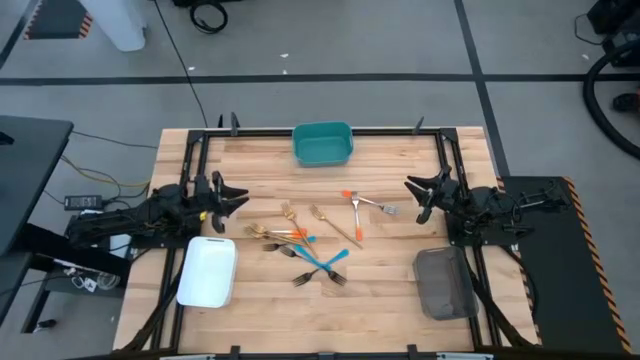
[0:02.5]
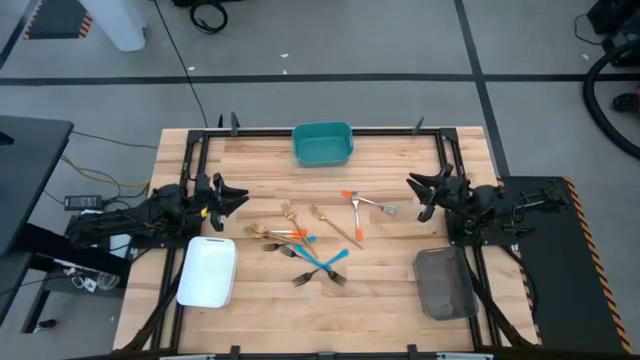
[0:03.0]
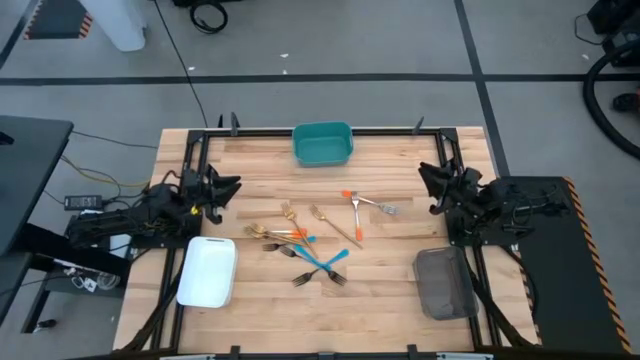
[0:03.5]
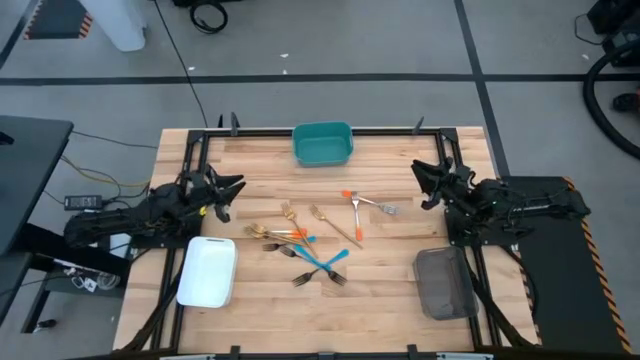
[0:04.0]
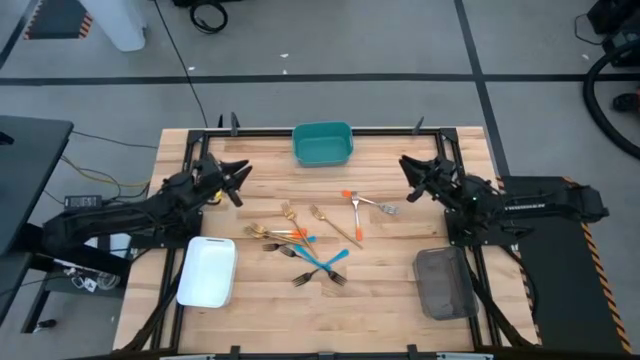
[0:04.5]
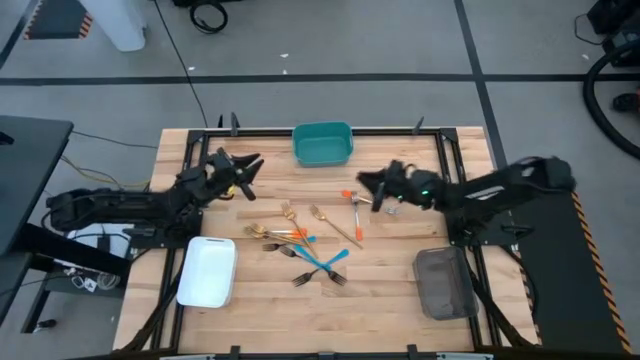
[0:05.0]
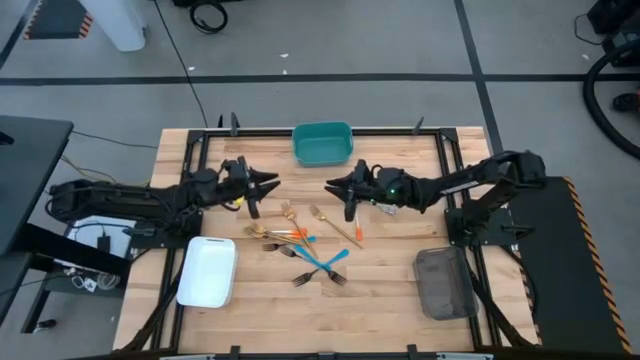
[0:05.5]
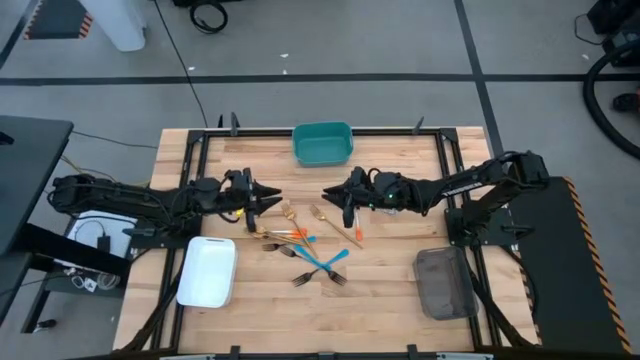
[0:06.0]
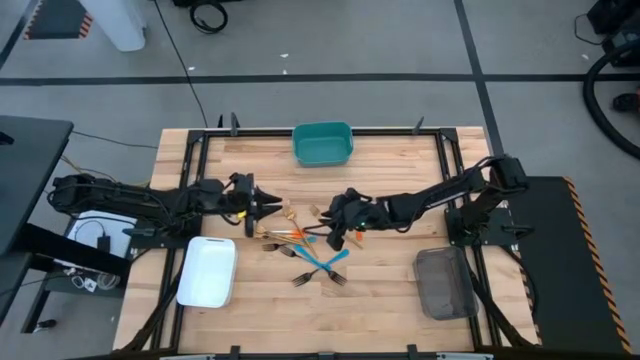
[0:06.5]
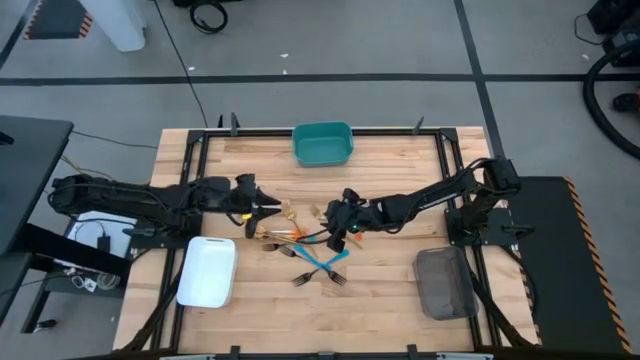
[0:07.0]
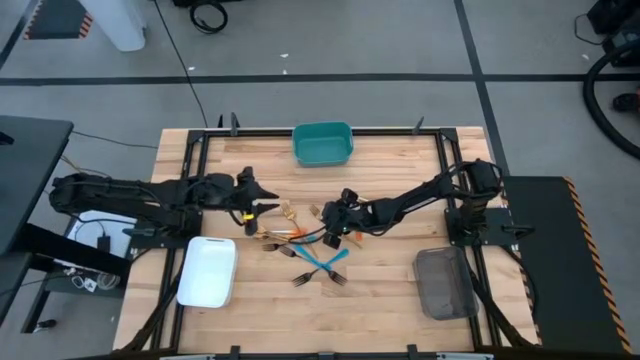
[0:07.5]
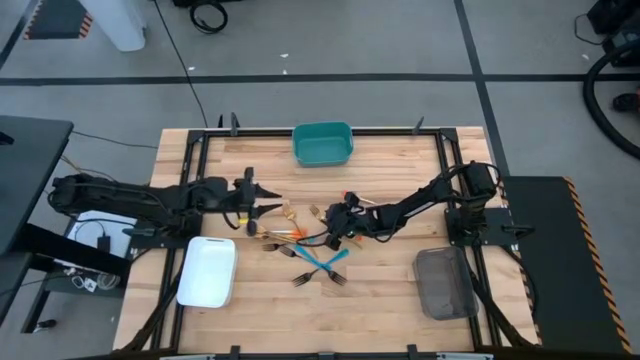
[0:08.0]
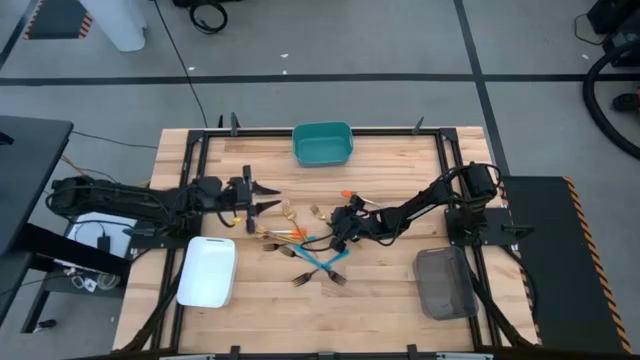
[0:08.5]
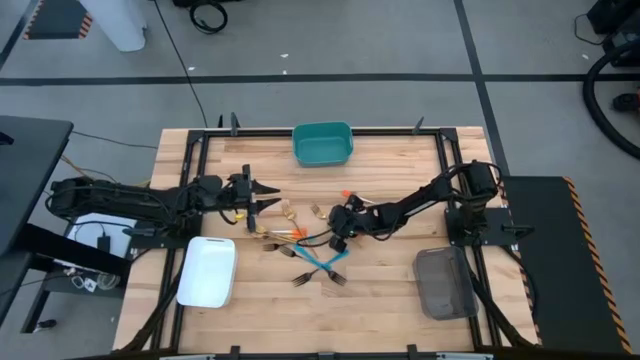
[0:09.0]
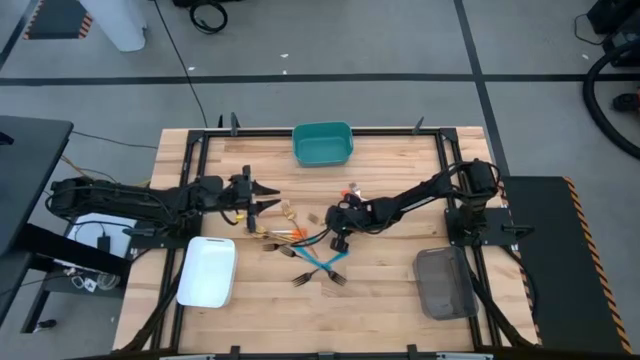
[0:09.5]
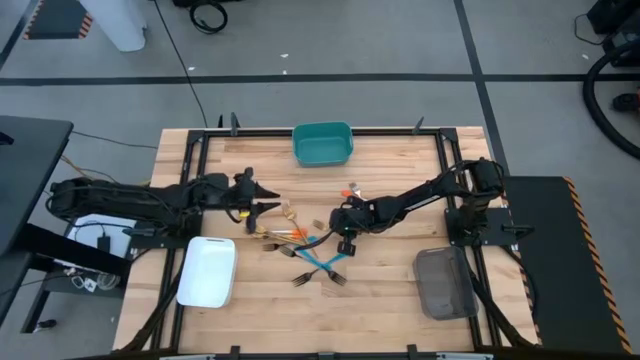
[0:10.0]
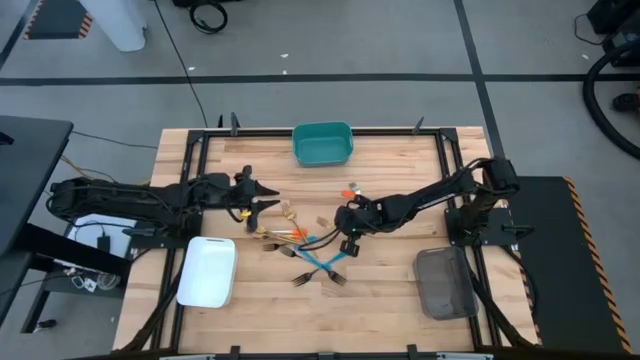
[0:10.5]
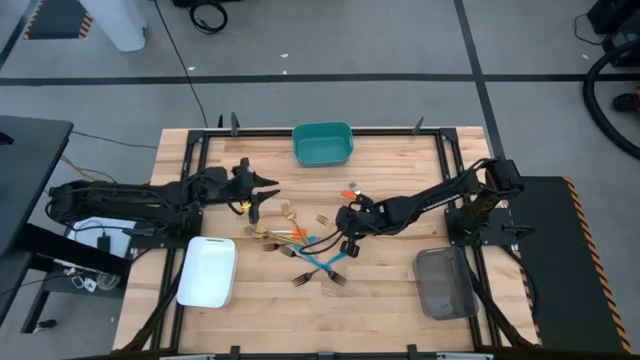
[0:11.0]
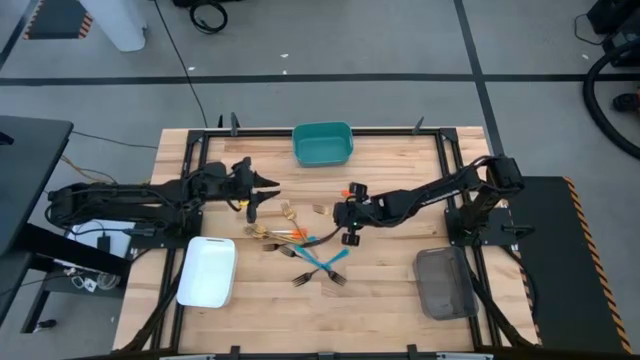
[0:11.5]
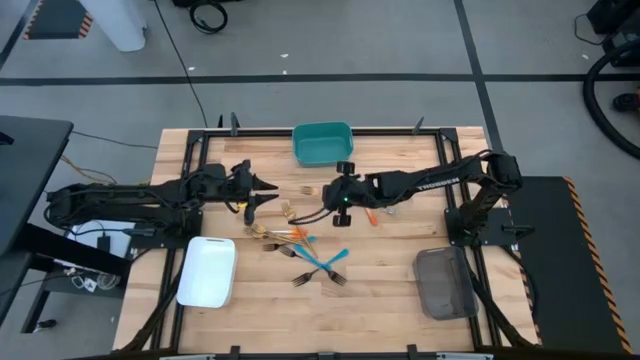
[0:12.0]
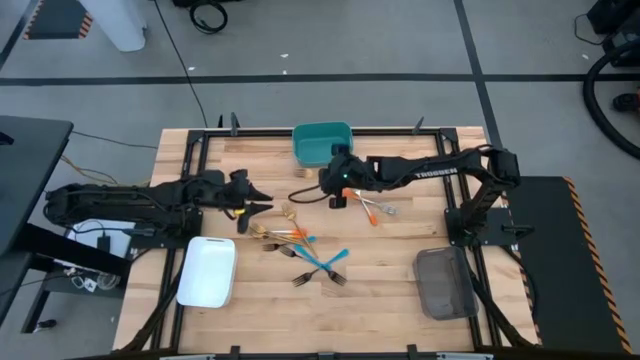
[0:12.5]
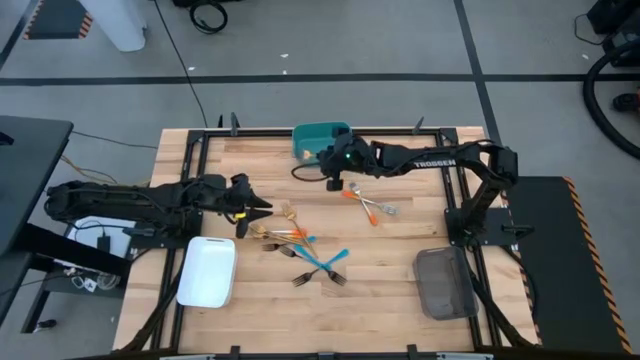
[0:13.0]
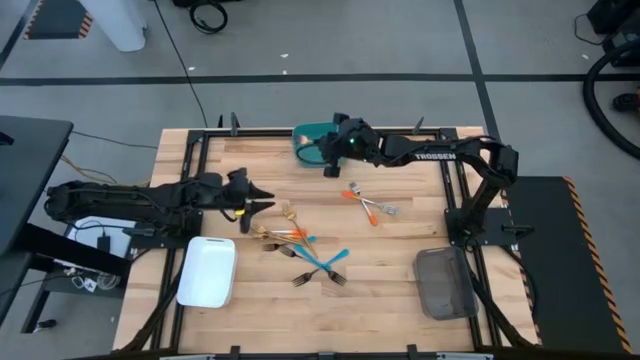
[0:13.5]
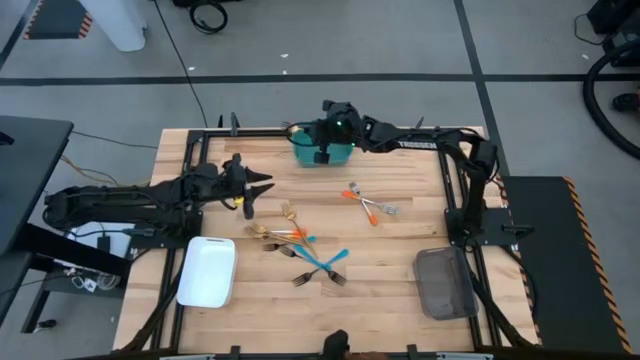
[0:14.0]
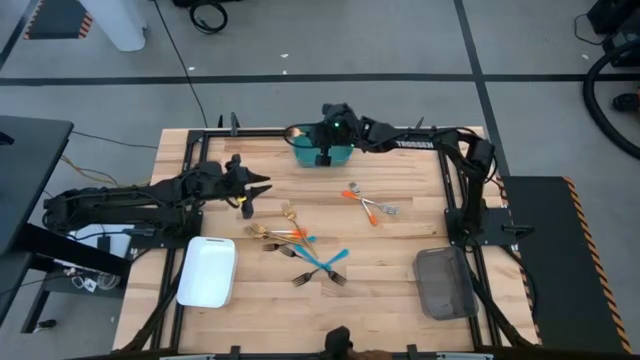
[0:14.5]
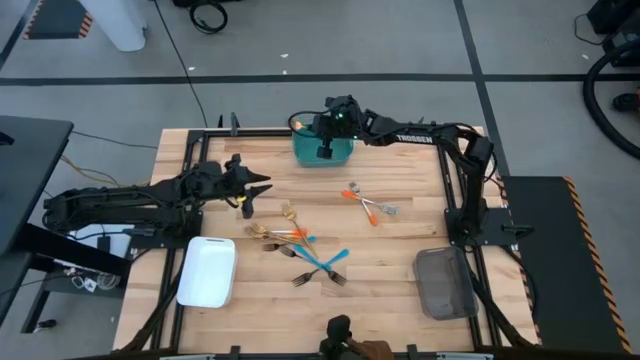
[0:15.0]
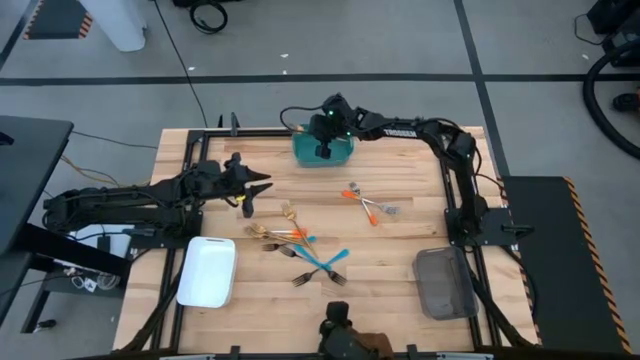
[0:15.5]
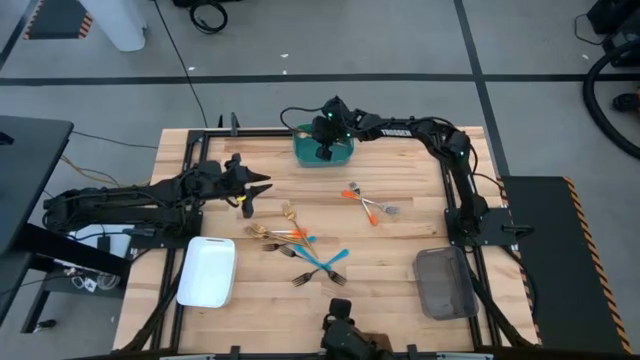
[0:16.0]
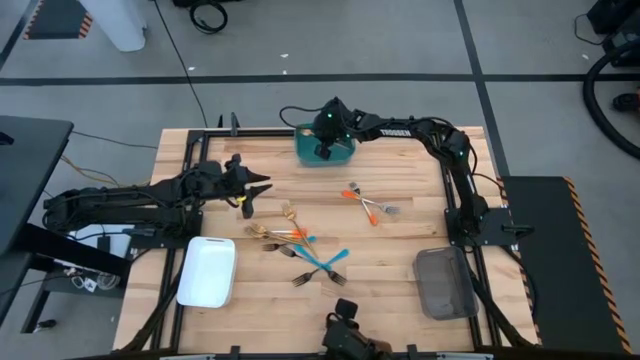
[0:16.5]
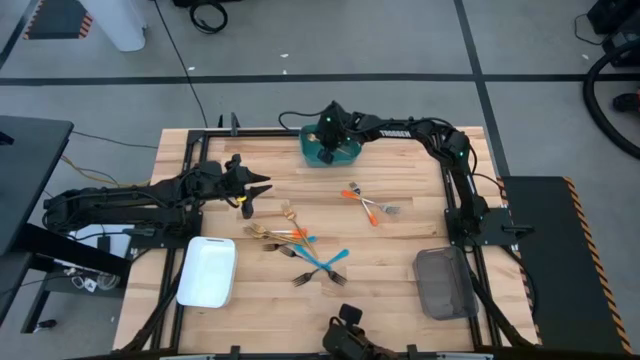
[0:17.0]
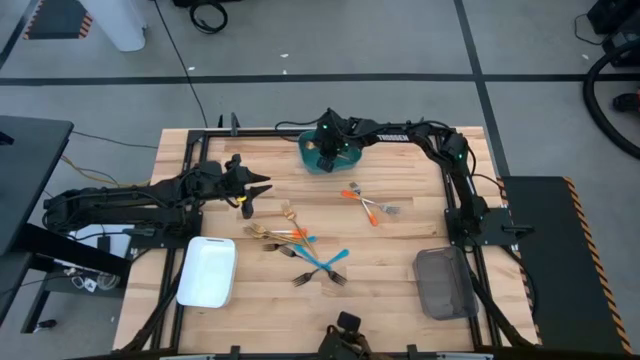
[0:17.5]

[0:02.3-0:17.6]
Task: Sort silverware by color (type)
Put the gold fork into the blue bin
